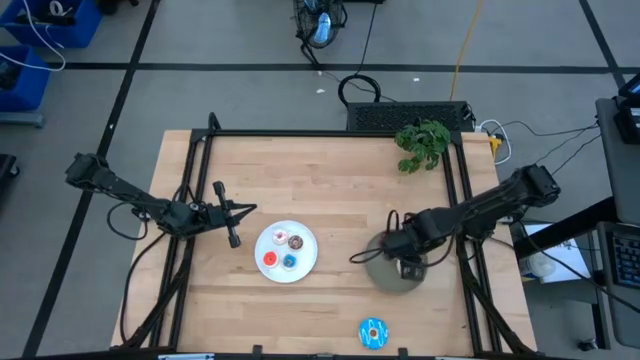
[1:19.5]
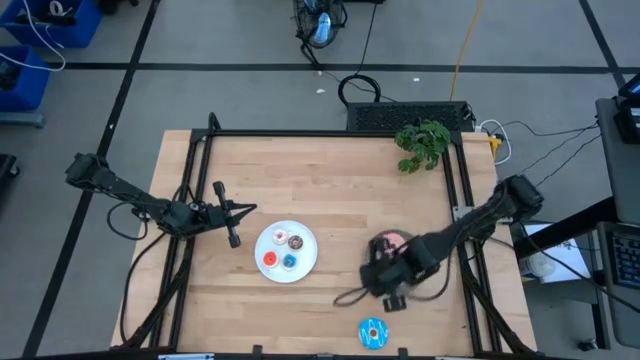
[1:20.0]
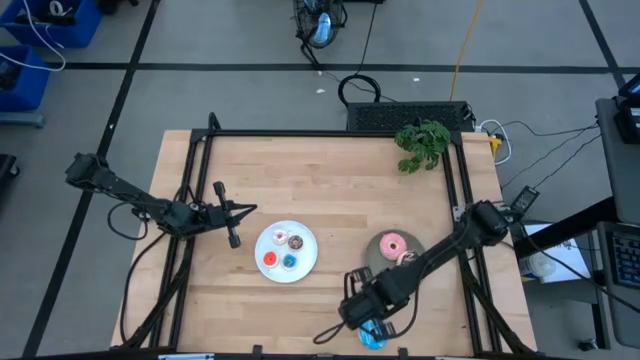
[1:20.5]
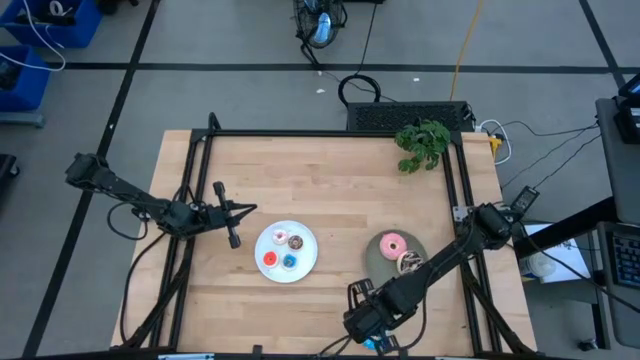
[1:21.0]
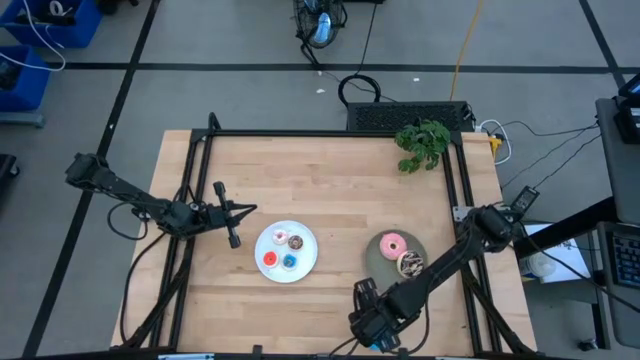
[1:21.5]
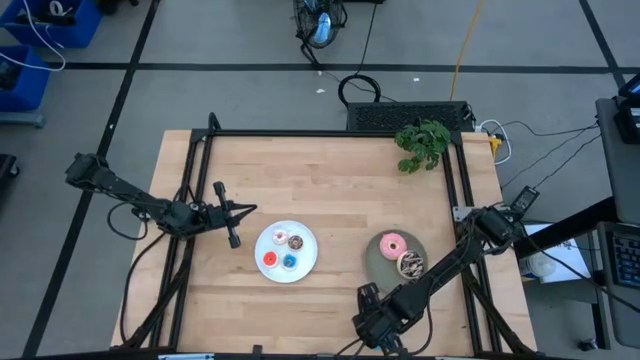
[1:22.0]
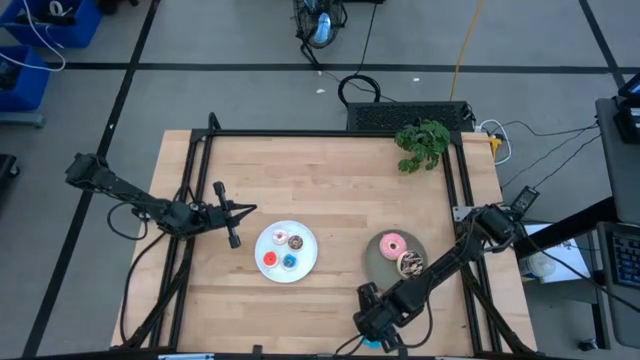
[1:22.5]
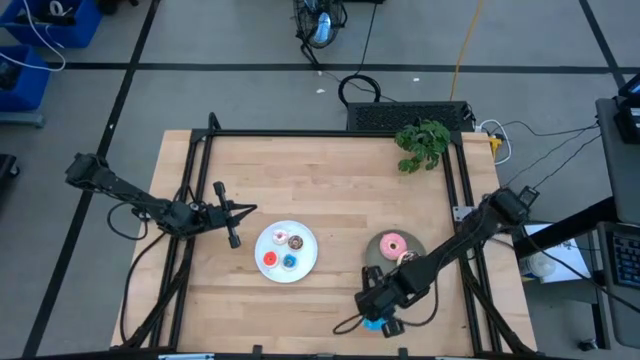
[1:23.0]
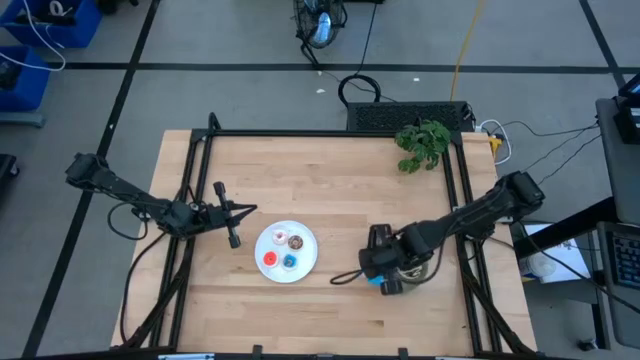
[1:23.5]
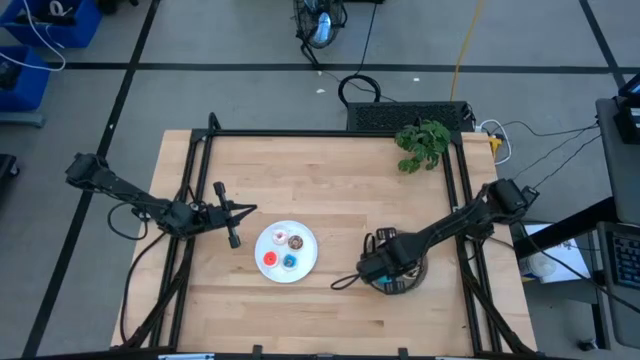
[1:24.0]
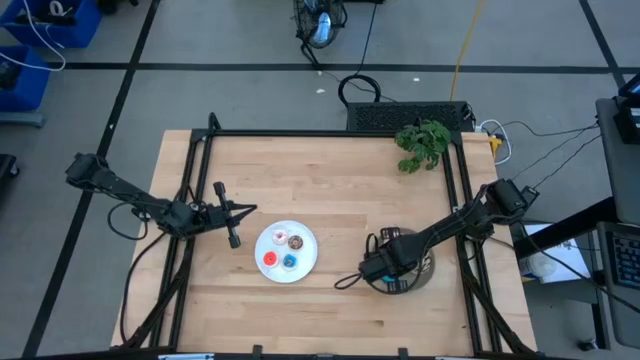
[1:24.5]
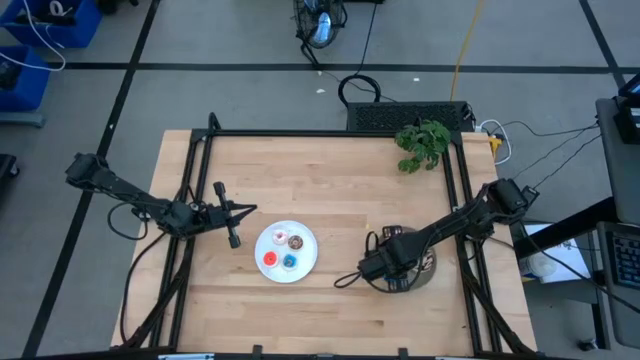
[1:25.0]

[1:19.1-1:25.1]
Task: Pick & Place donuts
Put the large blue donut on the gray plate

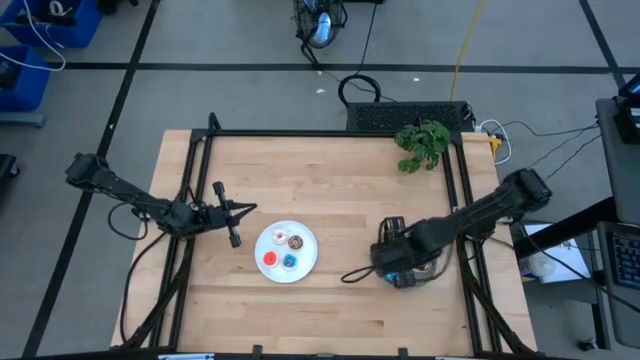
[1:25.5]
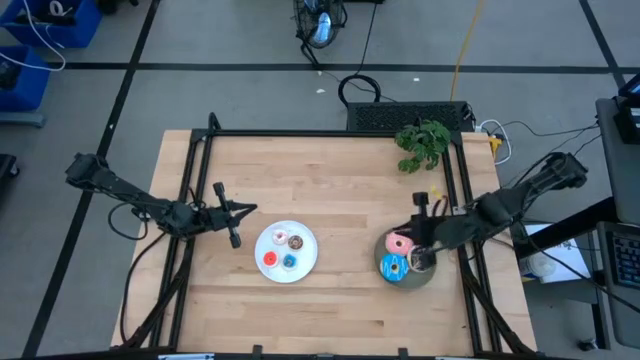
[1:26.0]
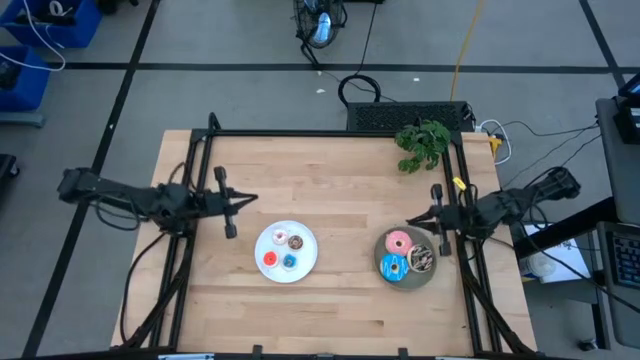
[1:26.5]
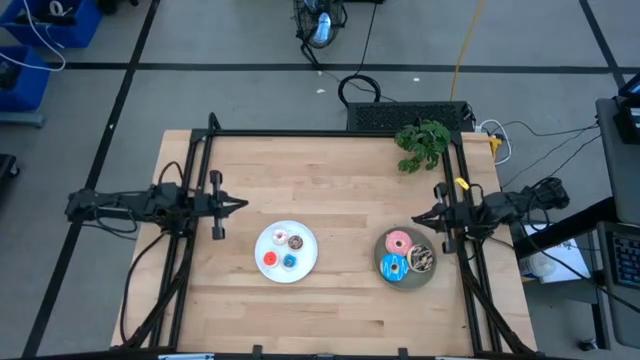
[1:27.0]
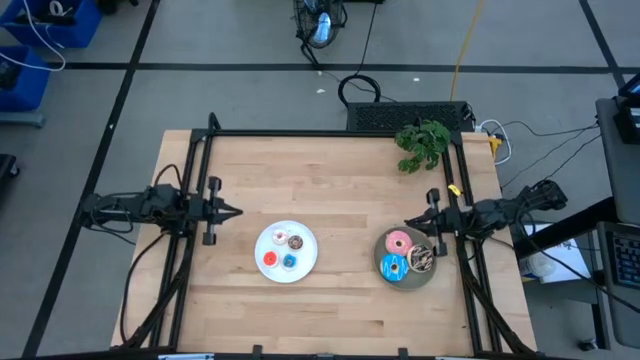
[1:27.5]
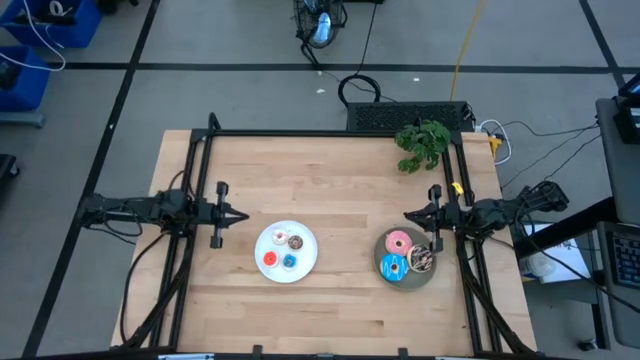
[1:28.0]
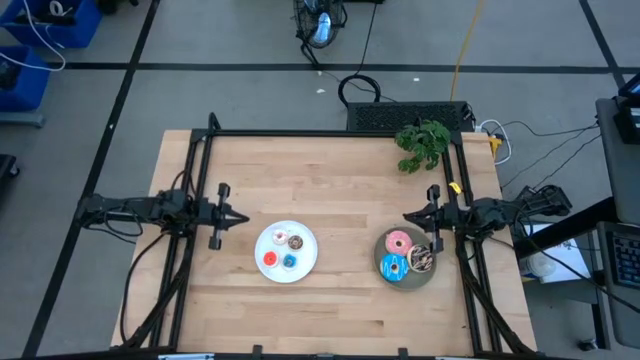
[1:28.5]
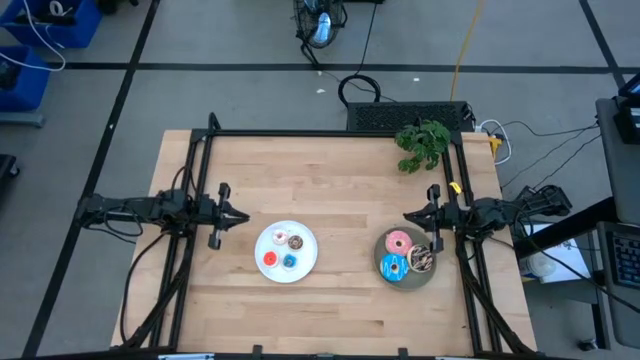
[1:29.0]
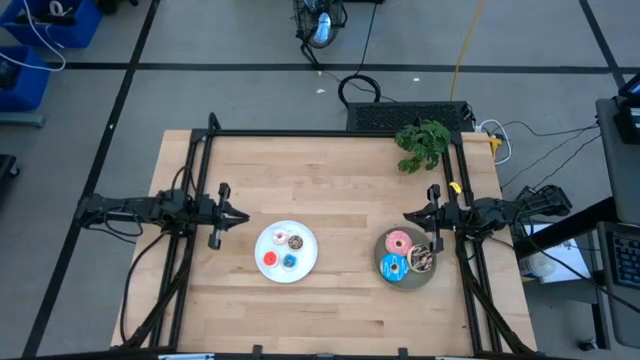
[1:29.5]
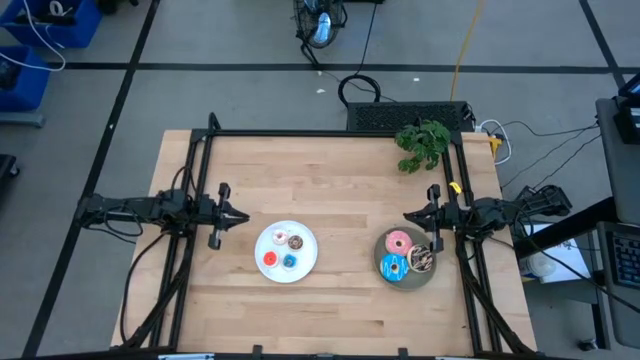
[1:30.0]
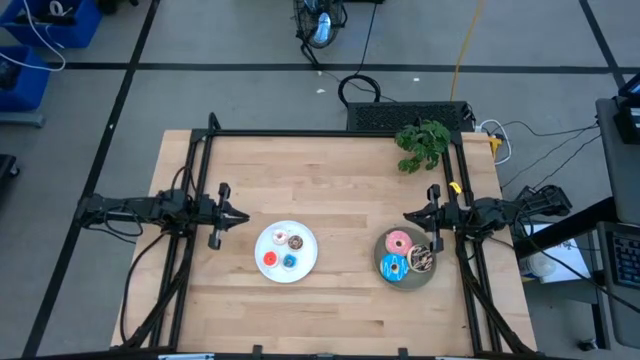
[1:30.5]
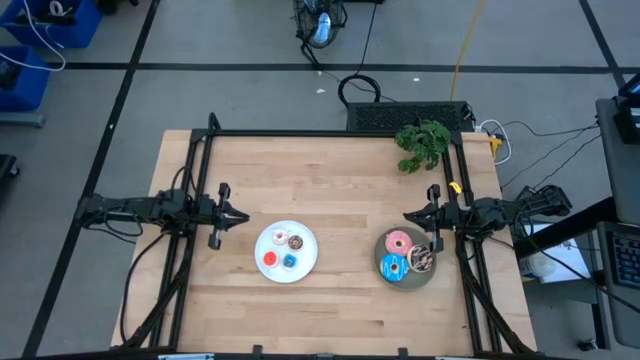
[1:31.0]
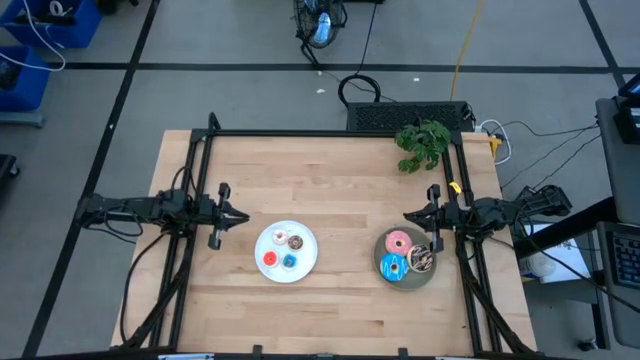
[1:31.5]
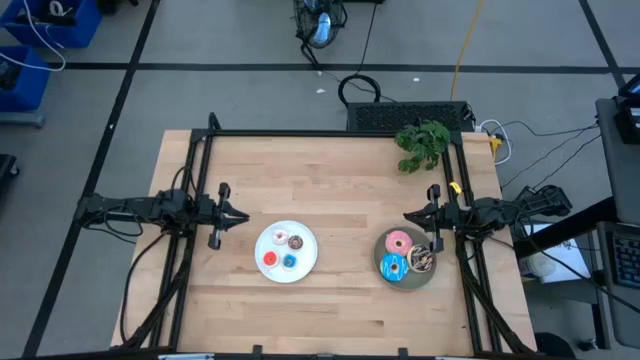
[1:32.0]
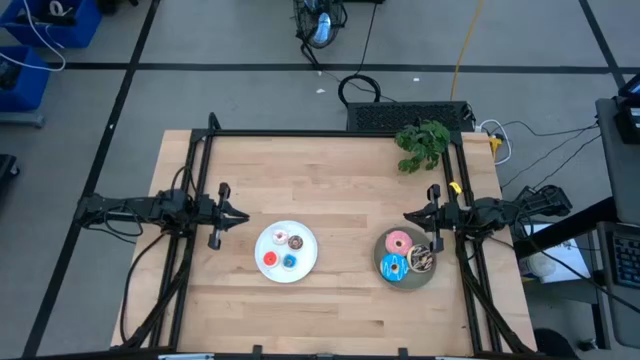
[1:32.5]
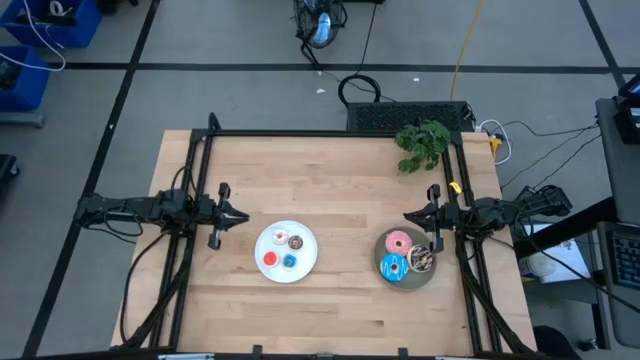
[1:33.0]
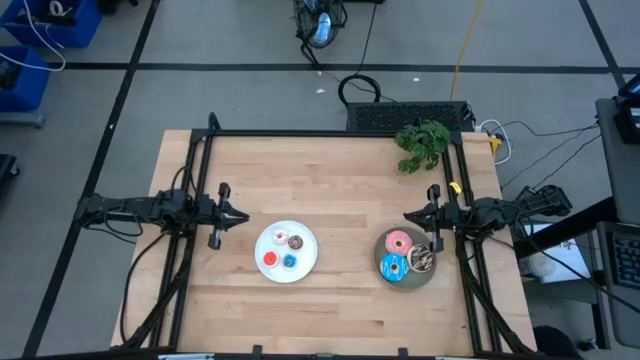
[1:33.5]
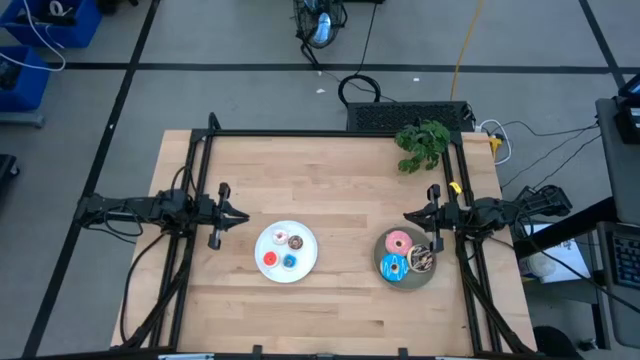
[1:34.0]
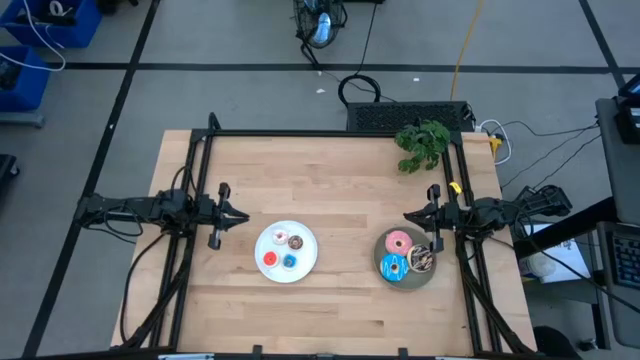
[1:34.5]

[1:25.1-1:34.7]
Return to Home Position

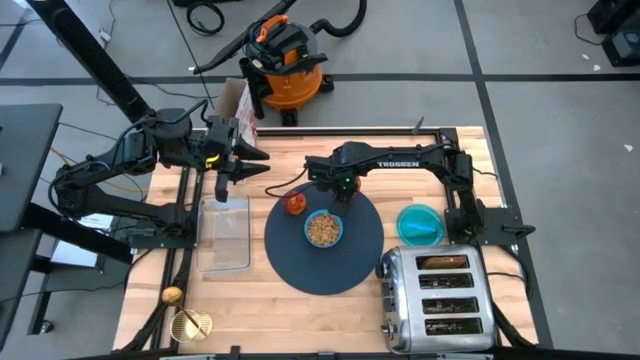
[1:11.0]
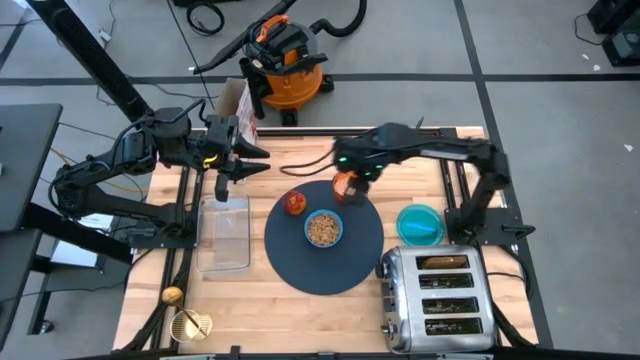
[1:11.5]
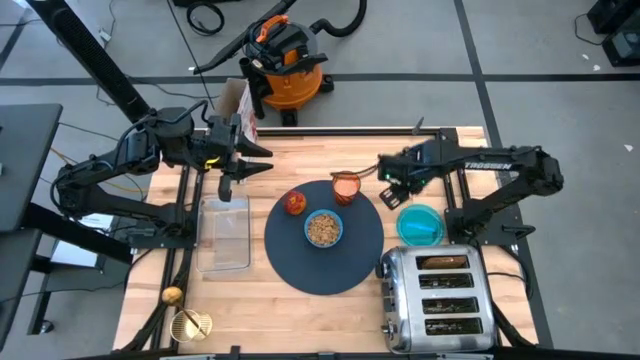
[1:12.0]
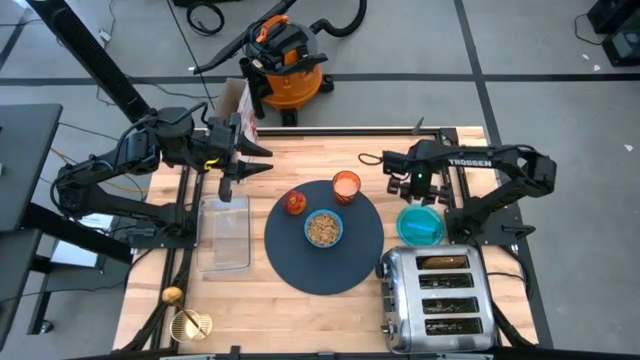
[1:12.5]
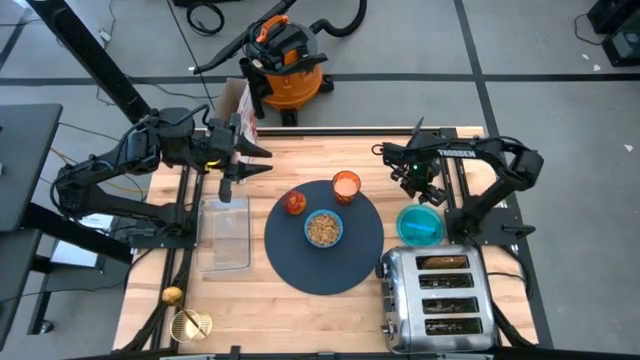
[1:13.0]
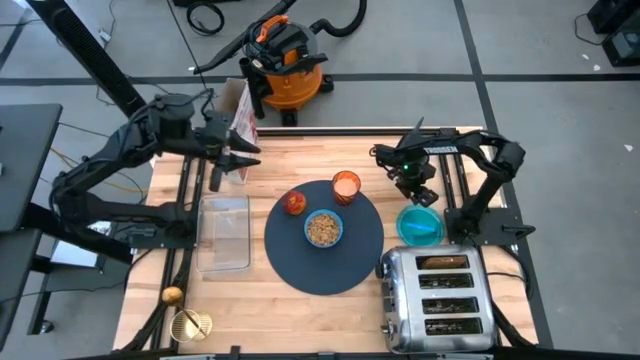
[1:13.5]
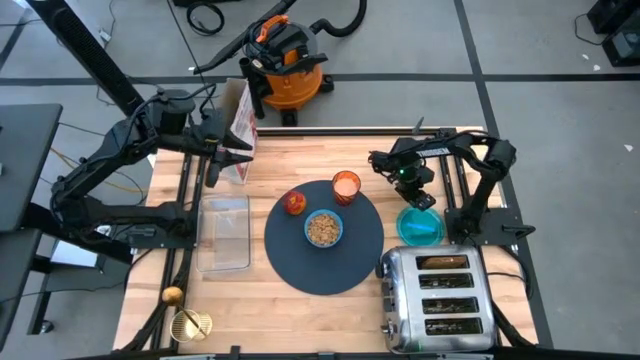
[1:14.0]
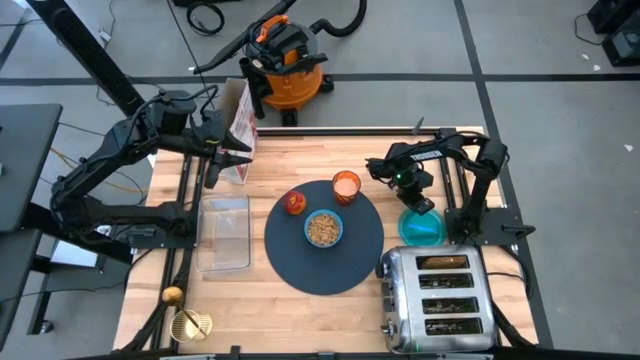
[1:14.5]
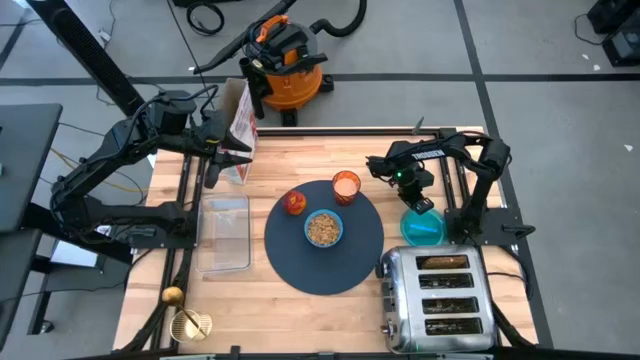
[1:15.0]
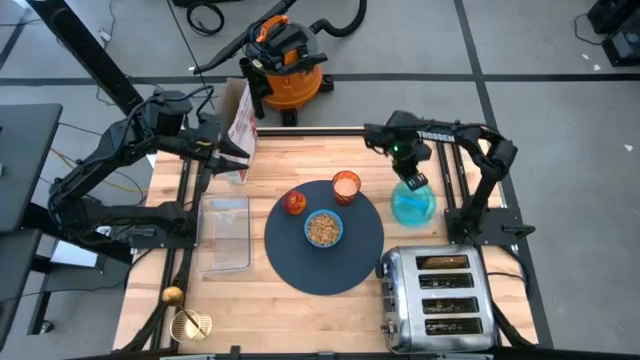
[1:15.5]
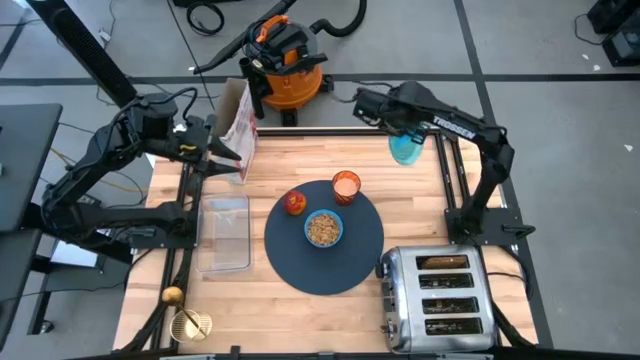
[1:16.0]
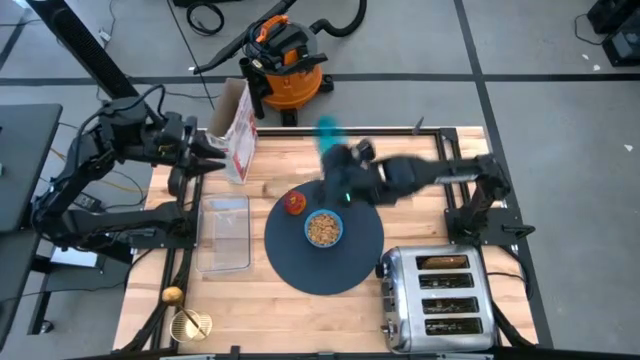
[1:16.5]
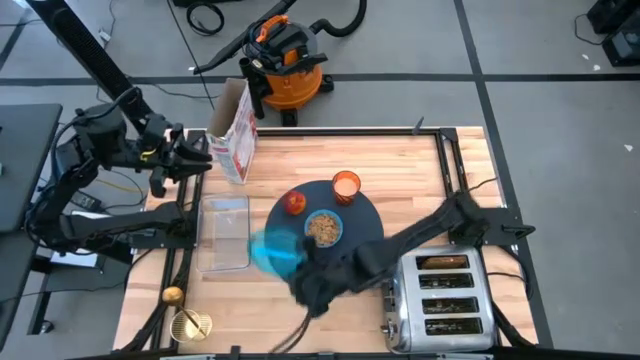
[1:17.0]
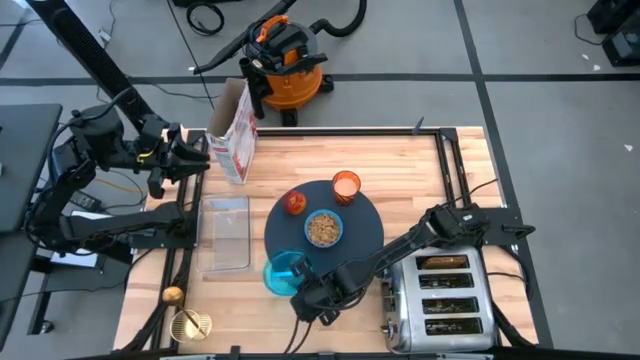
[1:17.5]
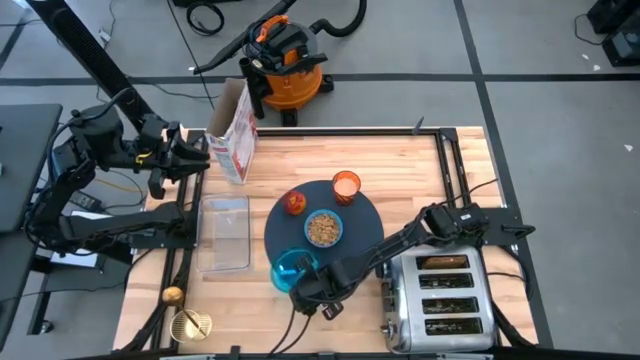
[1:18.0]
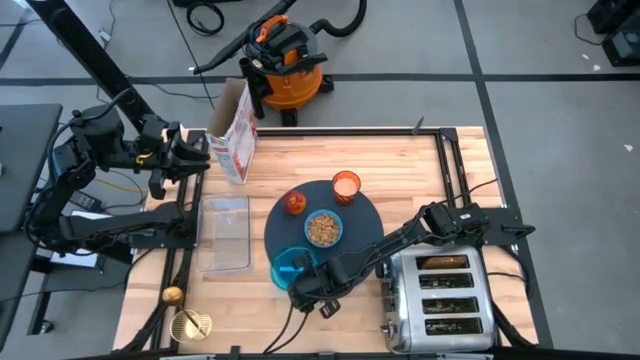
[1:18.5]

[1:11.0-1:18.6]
Task: Arrange a breakfast setting
Put the blue transparent plate on the blue tablemat to the bottom left of the tablemat
